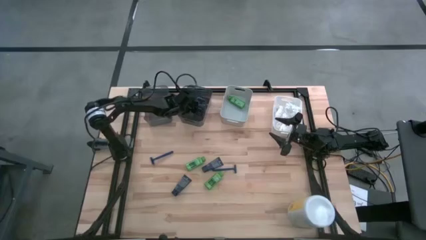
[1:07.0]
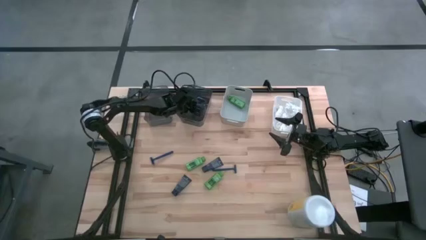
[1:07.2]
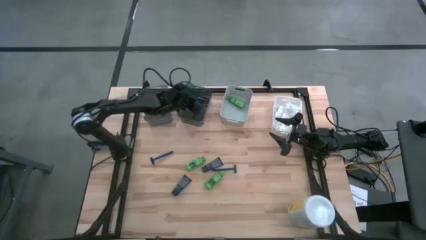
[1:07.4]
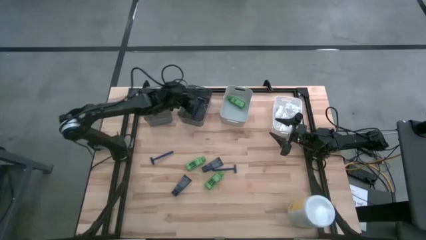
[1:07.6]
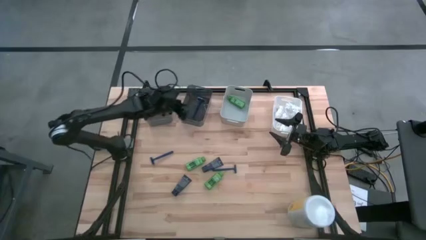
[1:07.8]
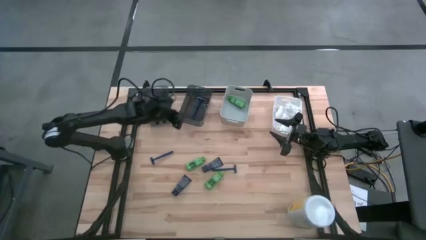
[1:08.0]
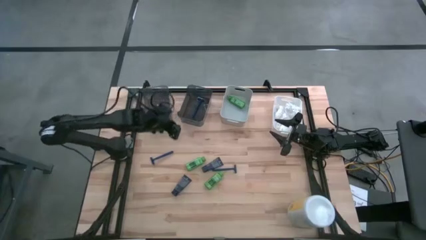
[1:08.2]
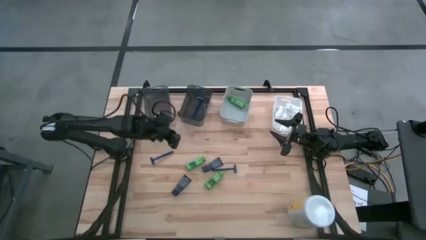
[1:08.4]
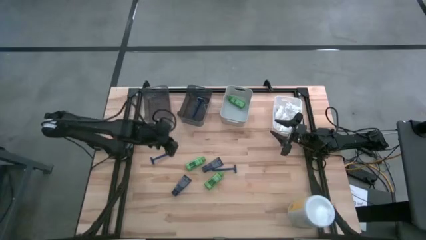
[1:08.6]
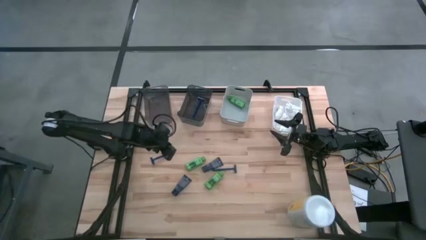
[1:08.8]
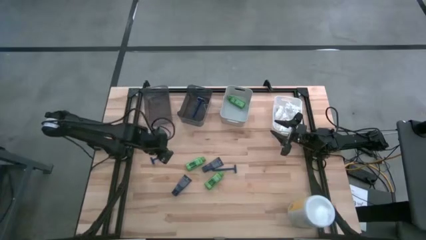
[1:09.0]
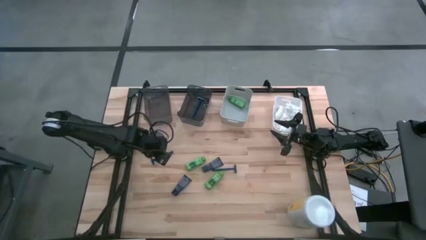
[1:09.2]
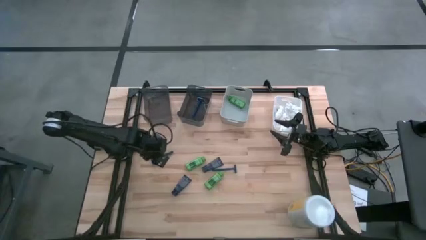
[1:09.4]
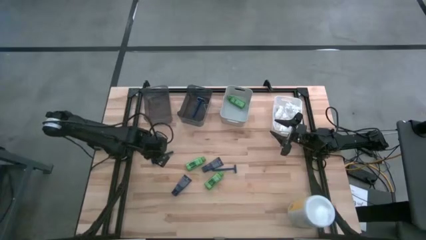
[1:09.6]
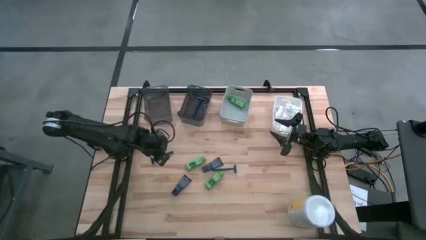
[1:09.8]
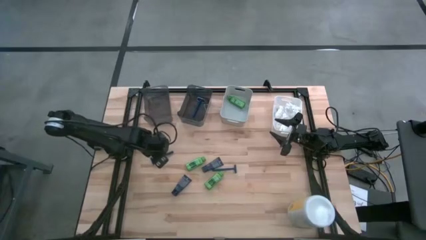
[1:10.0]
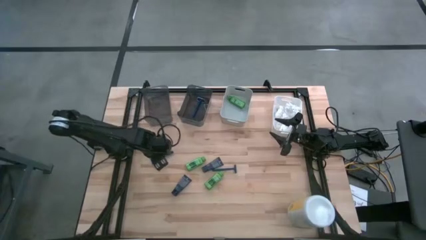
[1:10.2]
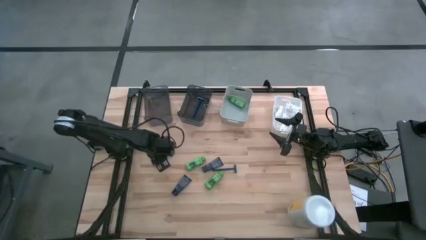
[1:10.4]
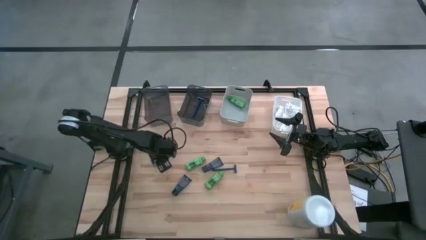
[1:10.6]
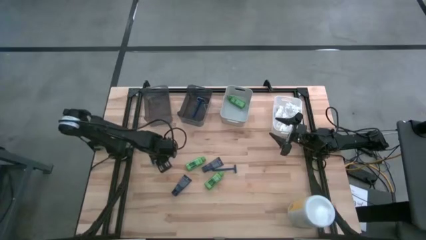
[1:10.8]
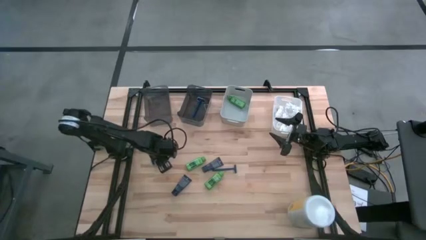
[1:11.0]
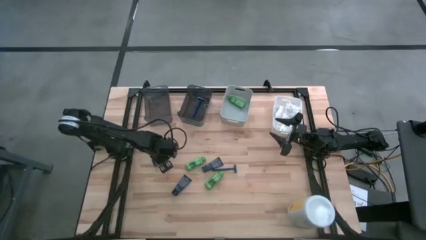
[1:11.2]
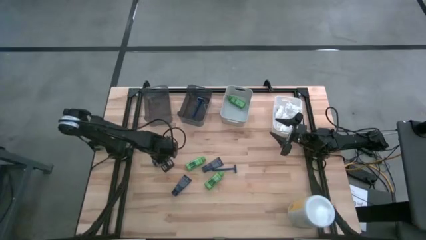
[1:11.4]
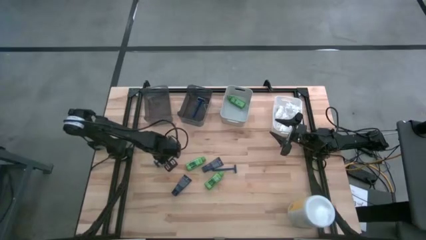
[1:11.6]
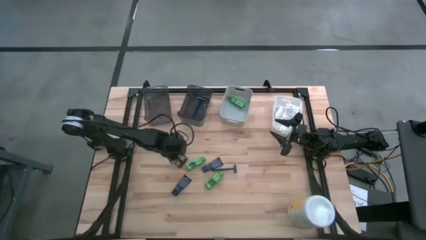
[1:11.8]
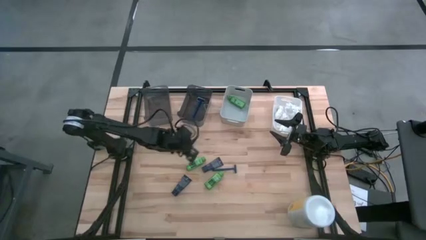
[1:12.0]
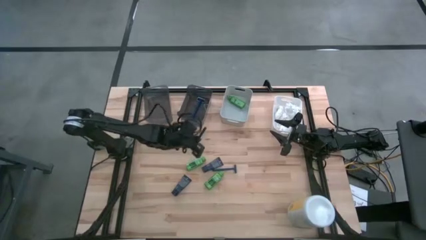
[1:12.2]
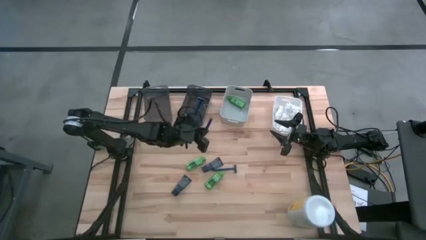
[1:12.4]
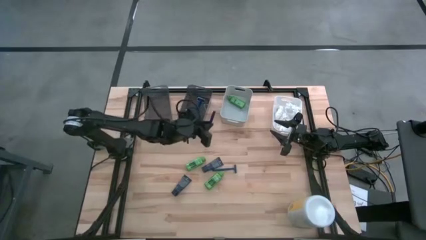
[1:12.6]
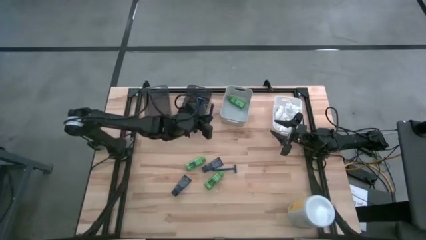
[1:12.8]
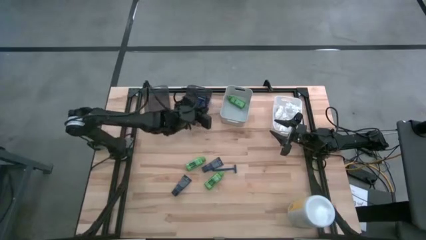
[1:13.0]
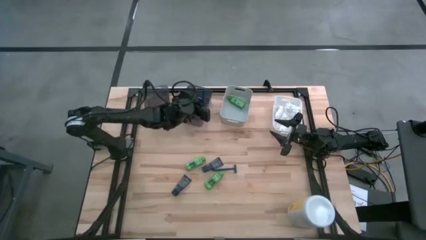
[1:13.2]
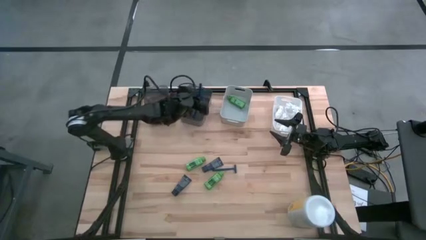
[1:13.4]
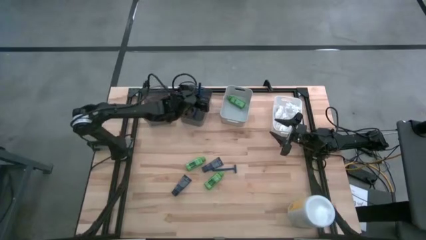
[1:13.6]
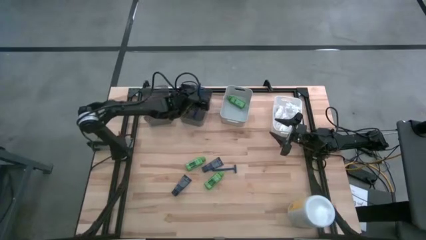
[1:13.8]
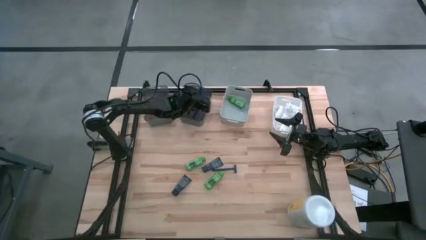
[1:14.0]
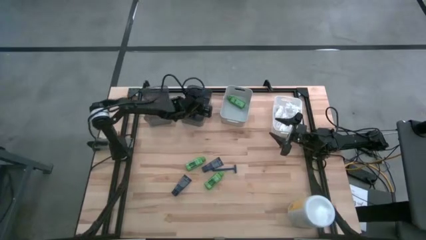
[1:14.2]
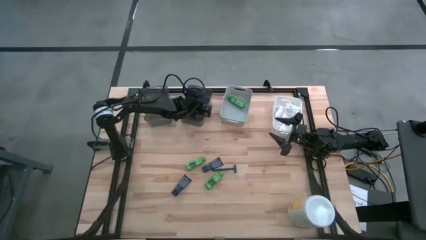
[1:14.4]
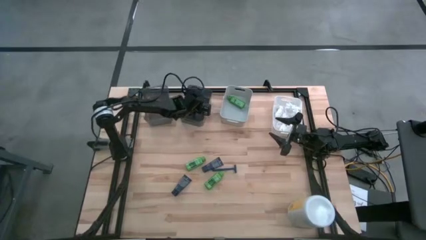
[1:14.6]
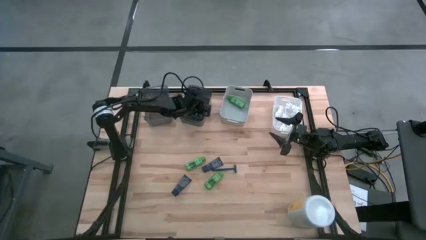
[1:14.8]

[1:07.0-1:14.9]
Task: Pick & Place Travel size toiletries
Put the blue razor into the right black bin

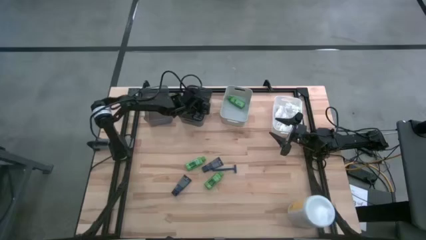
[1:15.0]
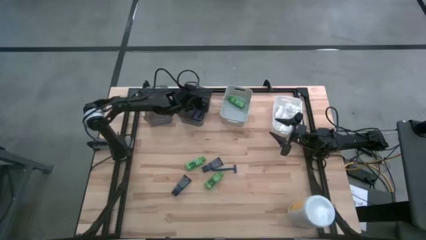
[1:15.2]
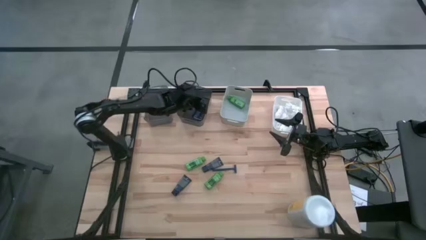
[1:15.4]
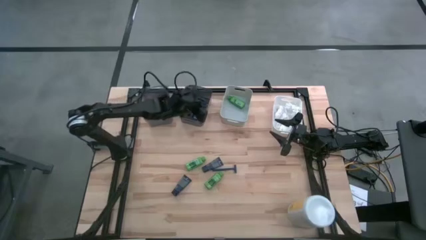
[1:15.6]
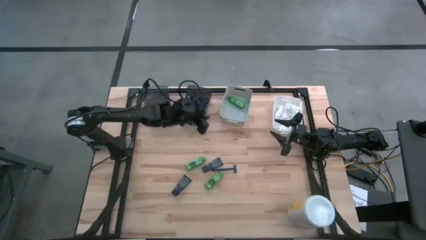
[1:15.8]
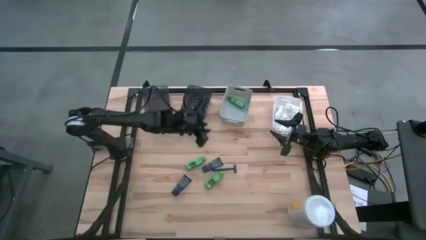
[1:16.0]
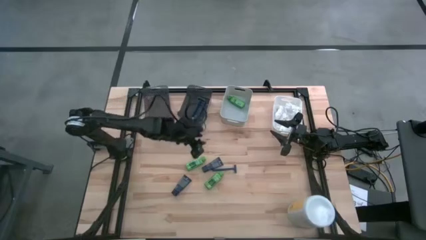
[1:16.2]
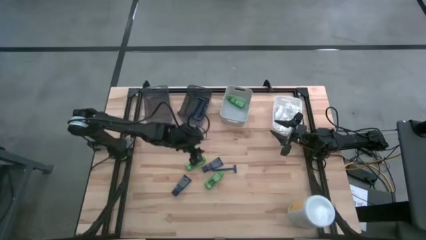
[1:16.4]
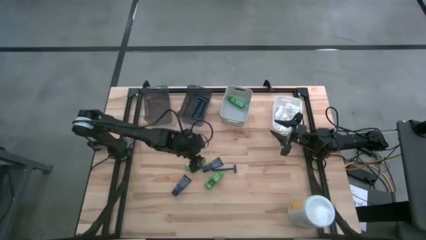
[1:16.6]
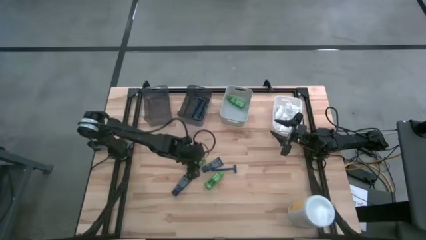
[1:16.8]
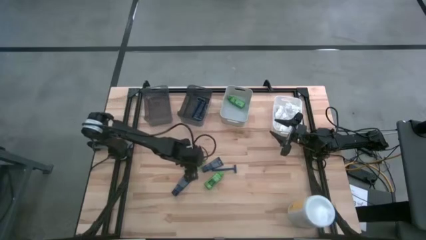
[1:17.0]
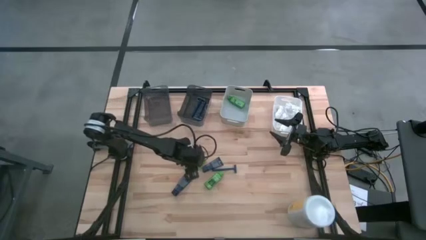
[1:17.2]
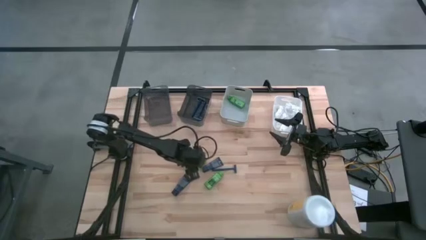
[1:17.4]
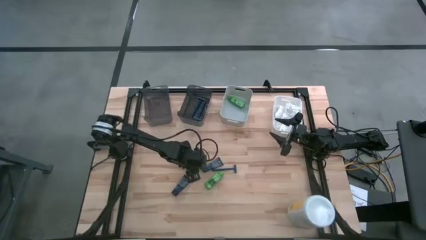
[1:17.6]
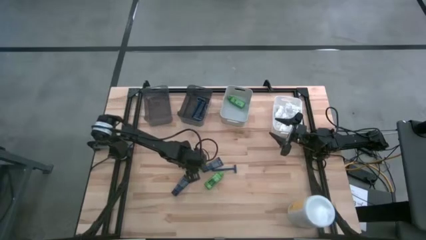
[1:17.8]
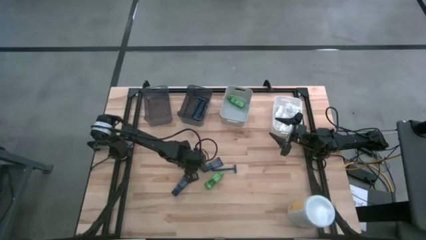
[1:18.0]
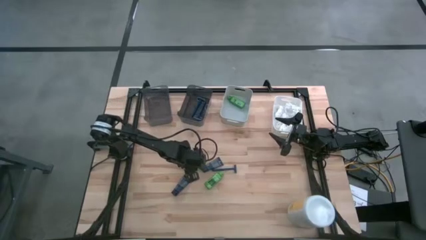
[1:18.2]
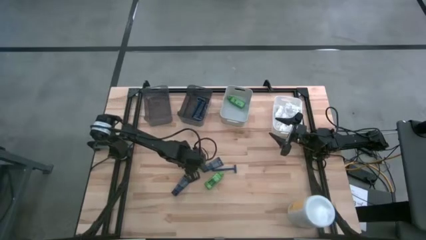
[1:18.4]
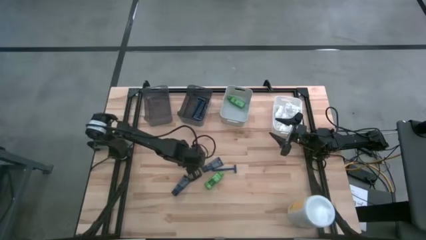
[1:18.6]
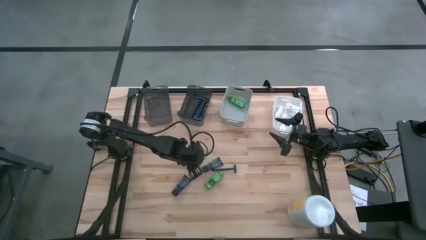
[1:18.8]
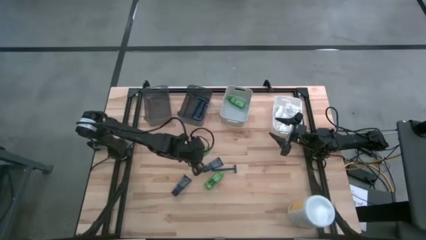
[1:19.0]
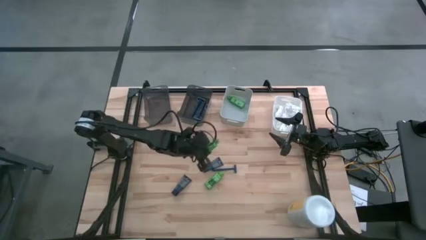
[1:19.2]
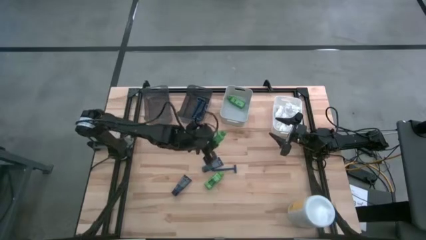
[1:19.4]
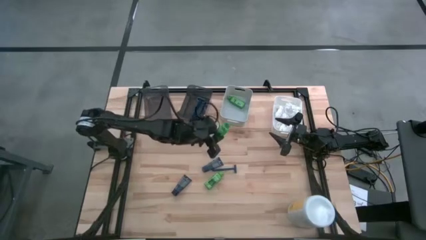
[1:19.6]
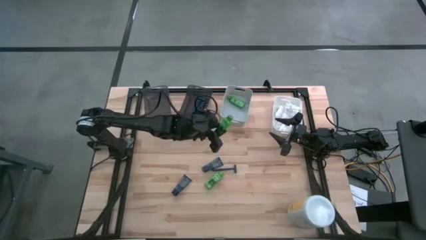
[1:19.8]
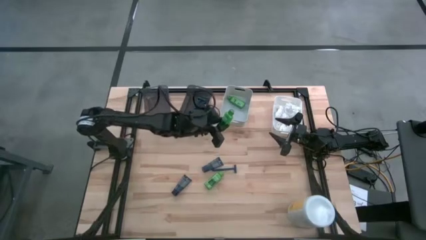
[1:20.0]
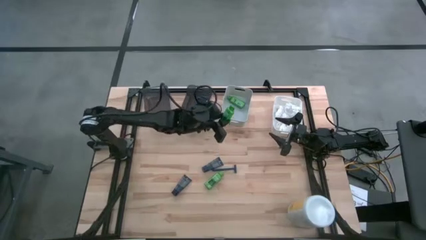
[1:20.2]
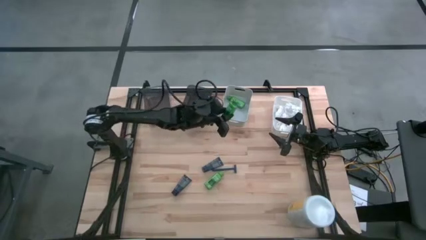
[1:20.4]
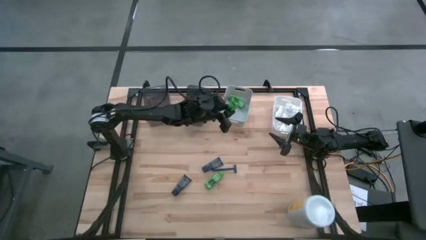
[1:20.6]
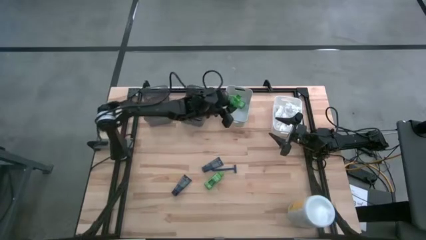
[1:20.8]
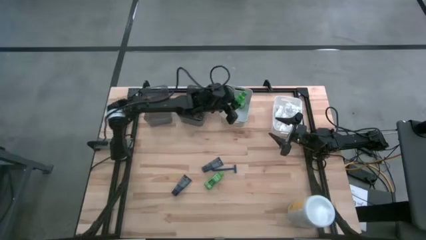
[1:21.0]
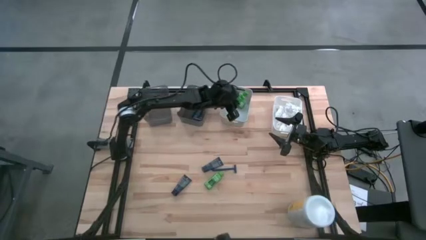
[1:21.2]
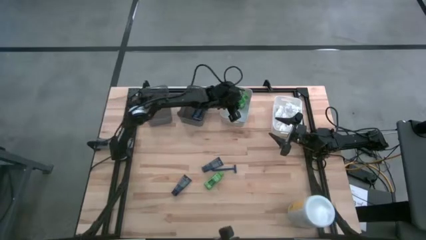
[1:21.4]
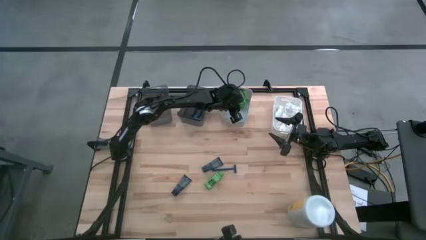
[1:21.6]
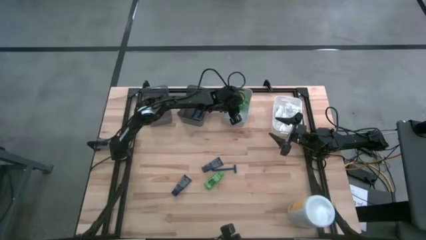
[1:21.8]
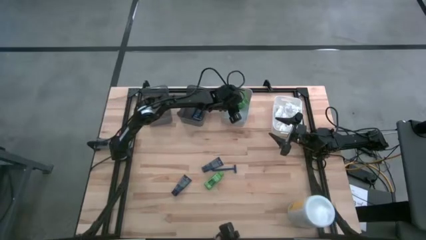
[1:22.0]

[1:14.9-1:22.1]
Put the green shampoo into the gray bin
